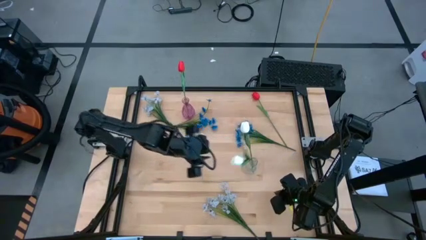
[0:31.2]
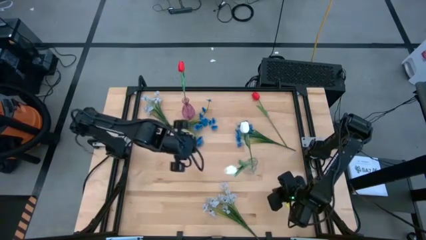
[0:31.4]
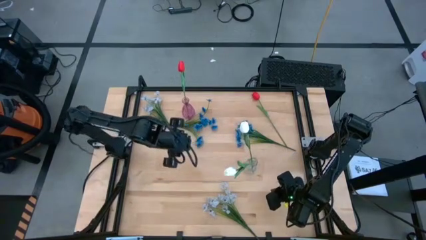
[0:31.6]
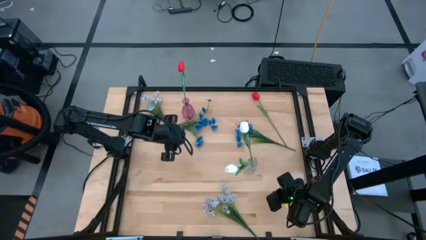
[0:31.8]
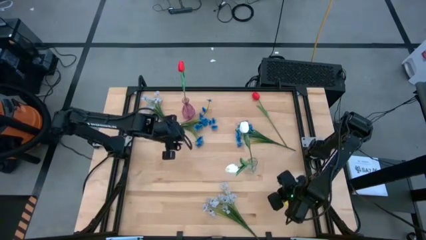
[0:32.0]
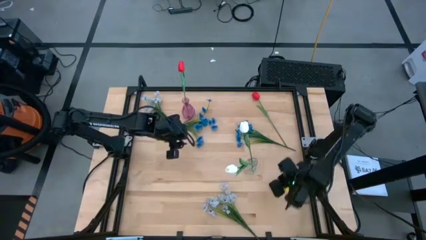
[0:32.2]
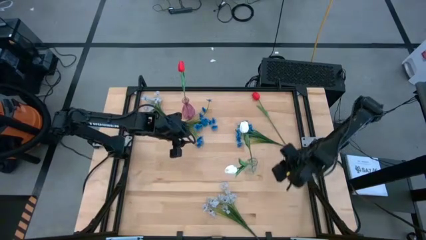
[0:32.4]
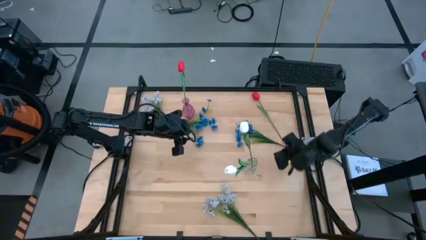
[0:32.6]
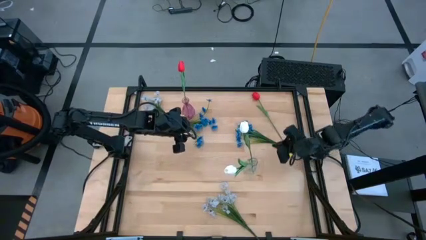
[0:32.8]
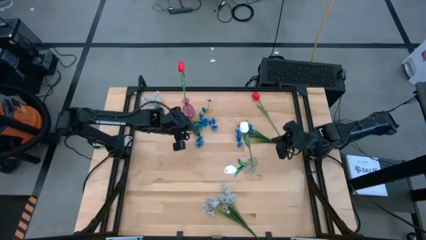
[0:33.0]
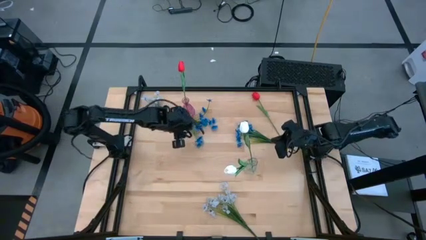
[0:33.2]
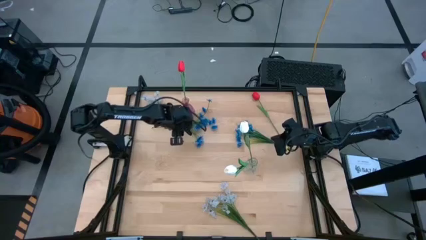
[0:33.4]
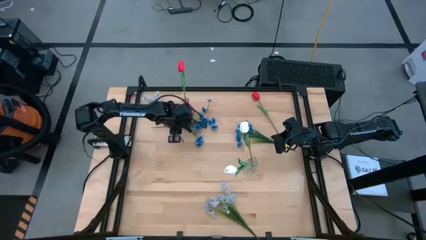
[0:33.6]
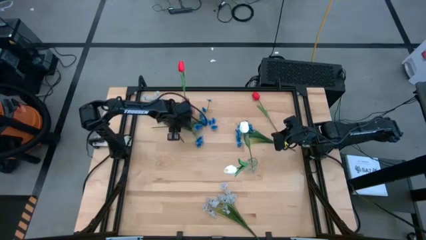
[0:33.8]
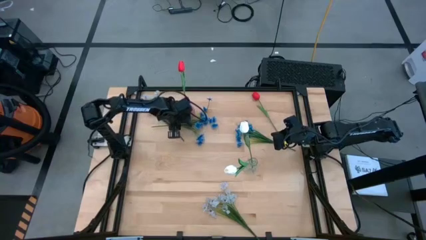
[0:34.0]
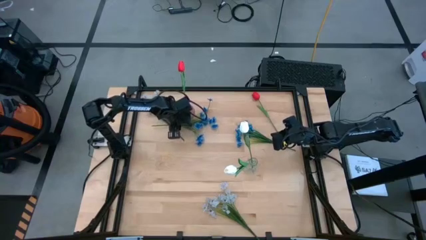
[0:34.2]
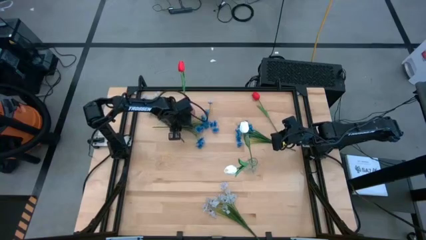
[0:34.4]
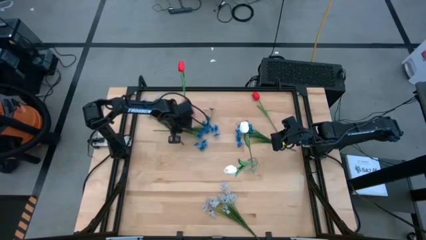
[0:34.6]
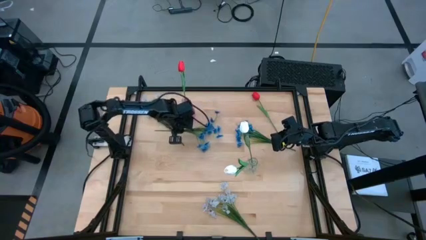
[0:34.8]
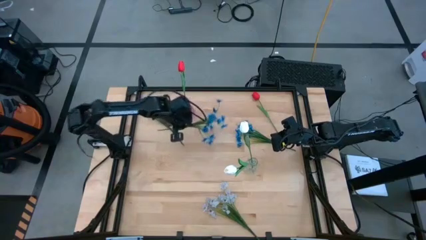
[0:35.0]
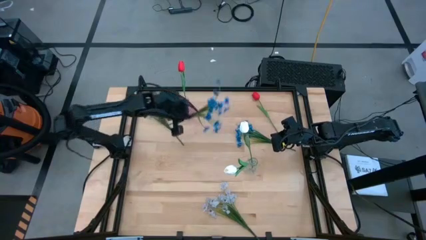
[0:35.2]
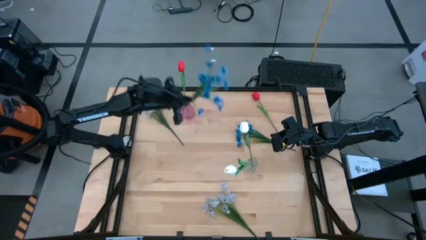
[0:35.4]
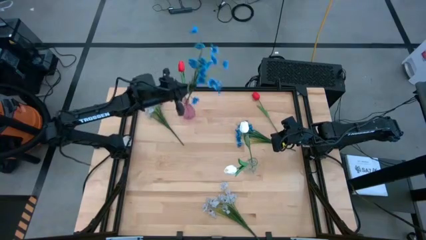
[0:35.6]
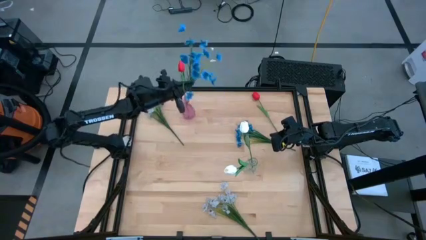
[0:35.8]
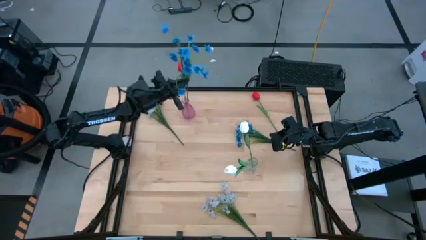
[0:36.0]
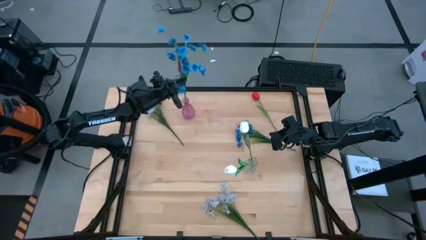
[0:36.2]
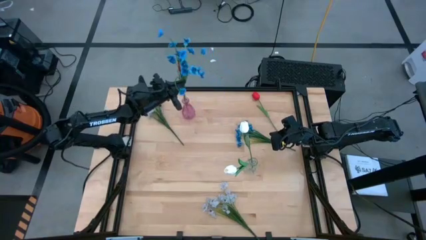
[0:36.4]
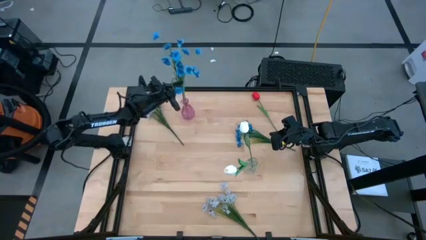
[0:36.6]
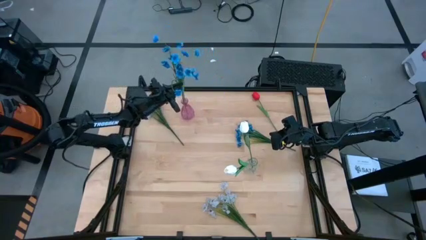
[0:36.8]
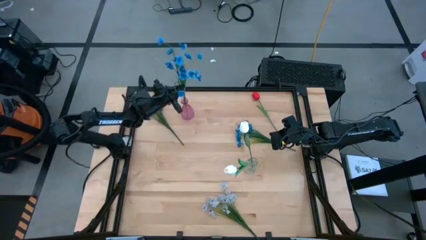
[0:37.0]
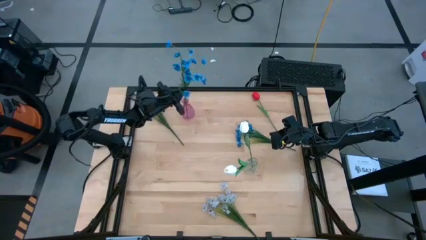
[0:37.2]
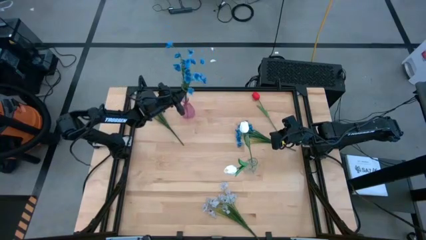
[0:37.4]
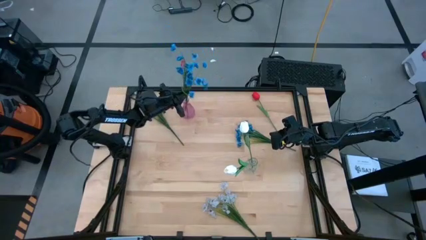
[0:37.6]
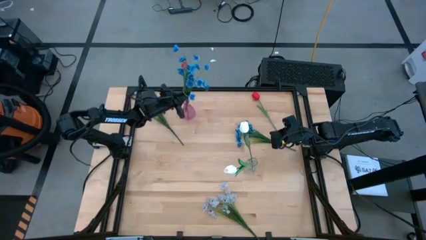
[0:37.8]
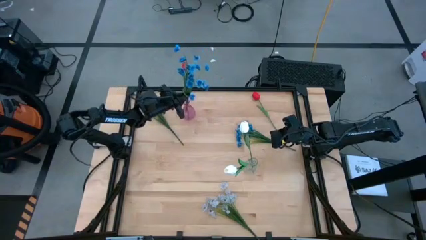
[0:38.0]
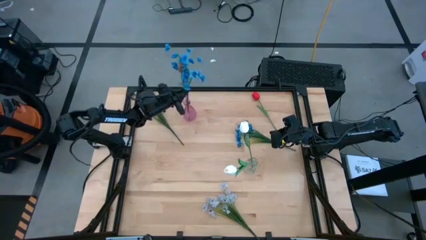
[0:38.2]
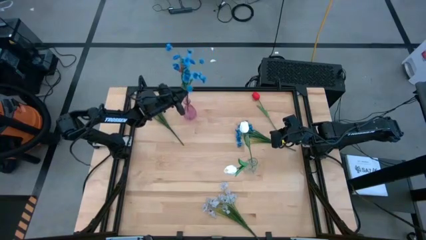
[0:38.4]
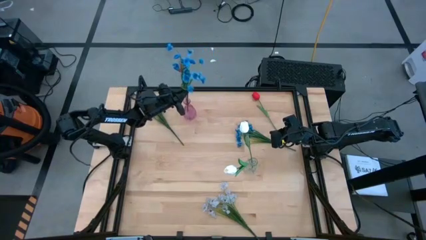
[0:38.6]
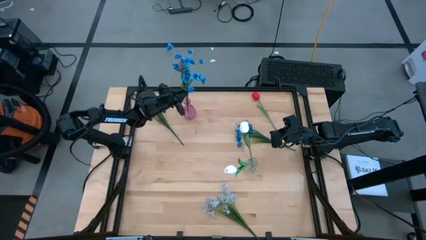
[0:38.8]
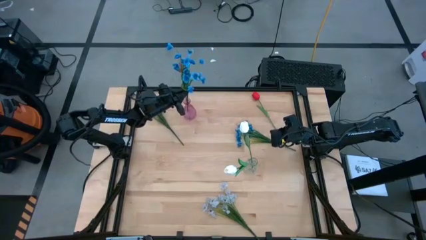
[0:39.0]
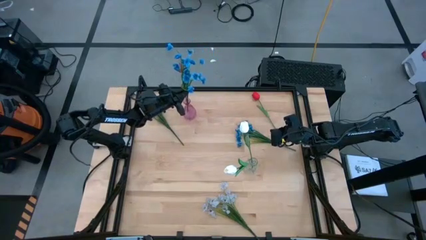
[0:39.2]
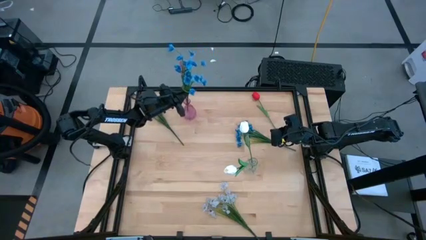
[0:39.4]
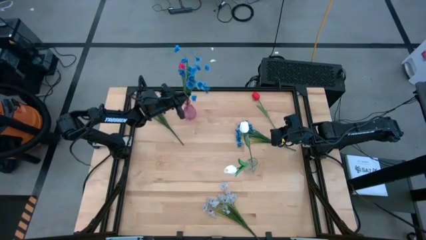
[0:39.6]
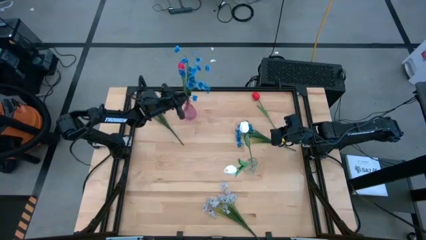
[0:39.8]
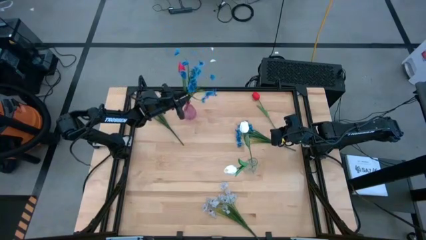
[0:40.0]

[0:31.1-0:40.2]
Task: Sort flowers into vase by color
Put the left blue flowers into the pink vase

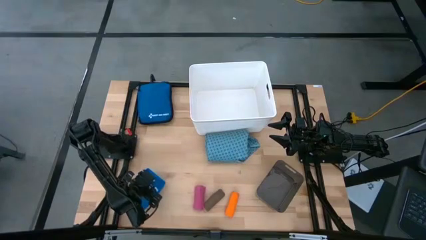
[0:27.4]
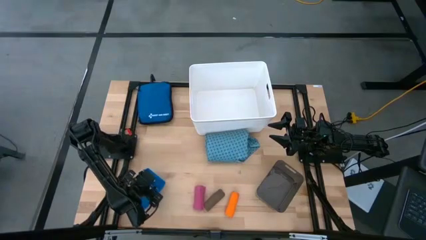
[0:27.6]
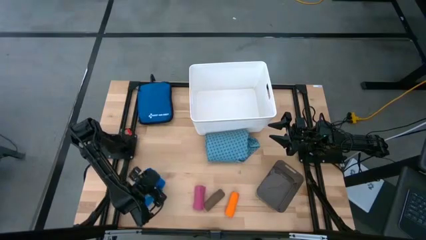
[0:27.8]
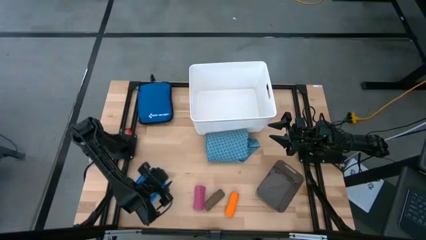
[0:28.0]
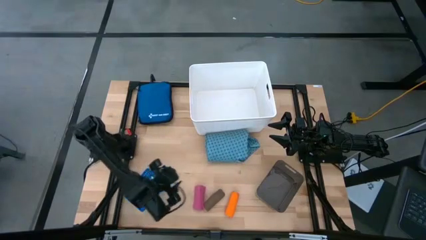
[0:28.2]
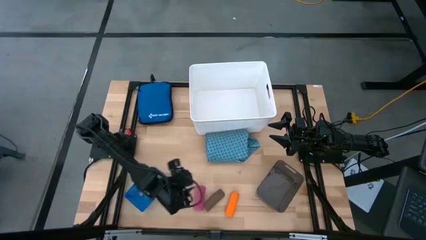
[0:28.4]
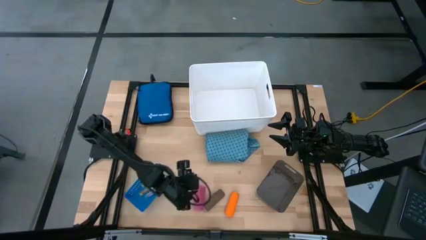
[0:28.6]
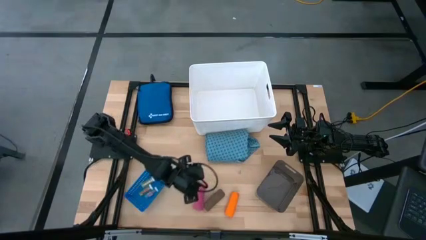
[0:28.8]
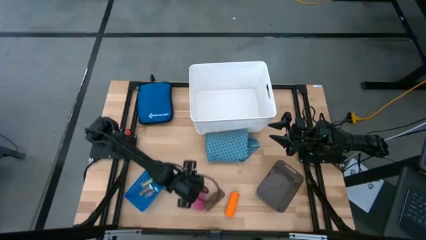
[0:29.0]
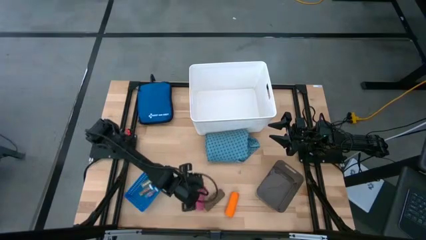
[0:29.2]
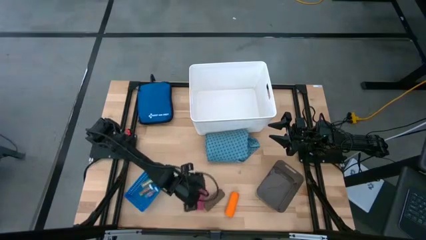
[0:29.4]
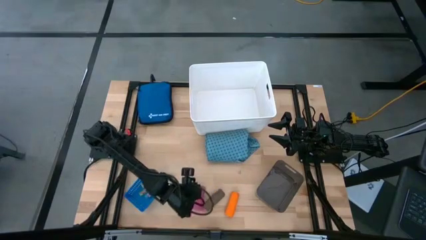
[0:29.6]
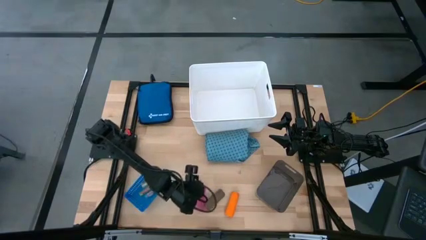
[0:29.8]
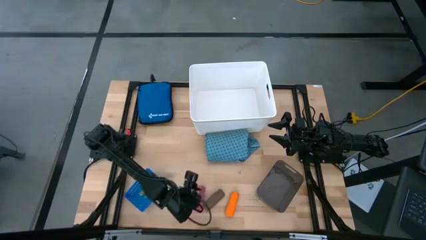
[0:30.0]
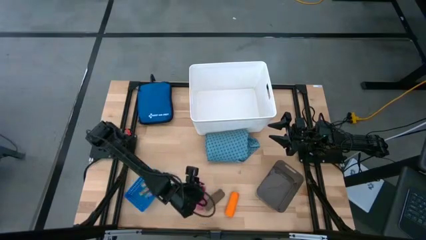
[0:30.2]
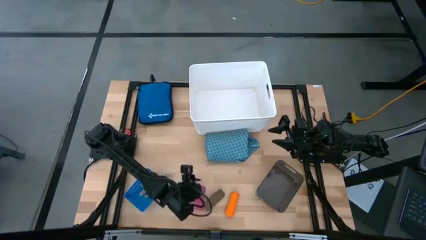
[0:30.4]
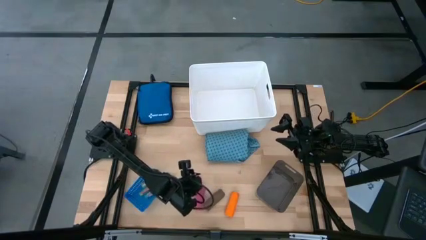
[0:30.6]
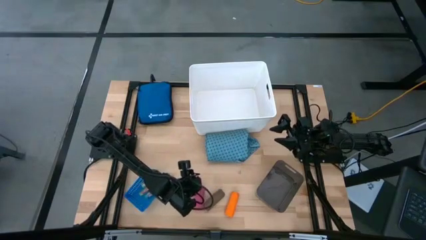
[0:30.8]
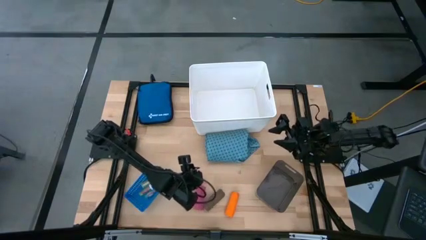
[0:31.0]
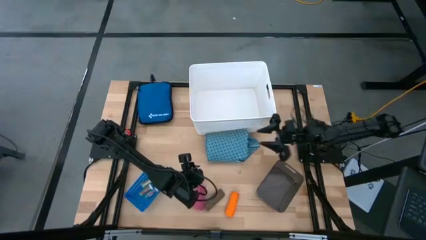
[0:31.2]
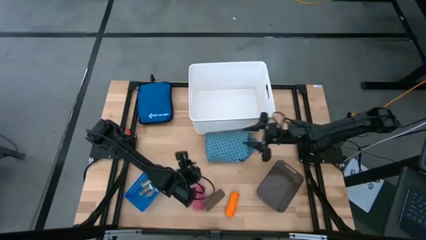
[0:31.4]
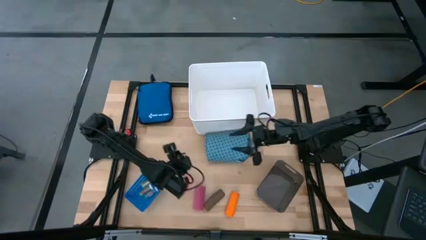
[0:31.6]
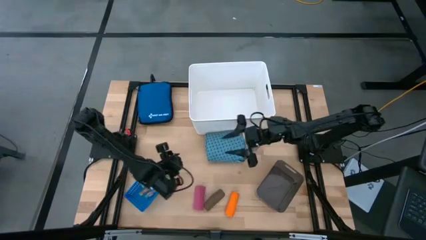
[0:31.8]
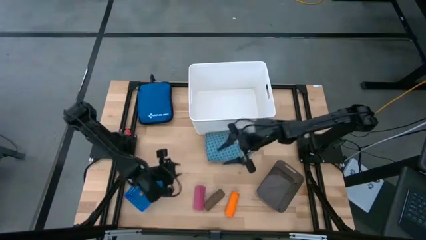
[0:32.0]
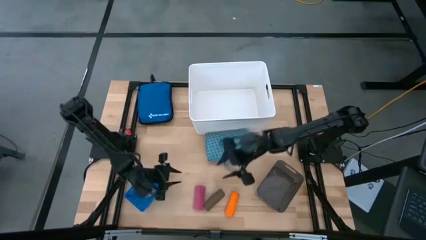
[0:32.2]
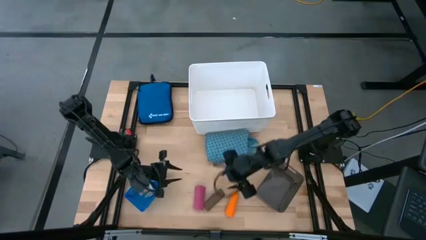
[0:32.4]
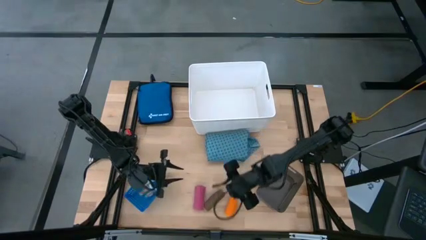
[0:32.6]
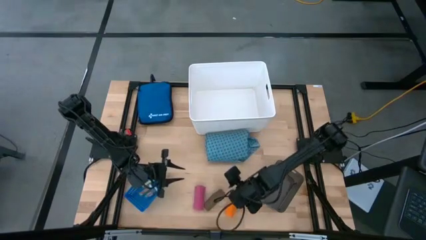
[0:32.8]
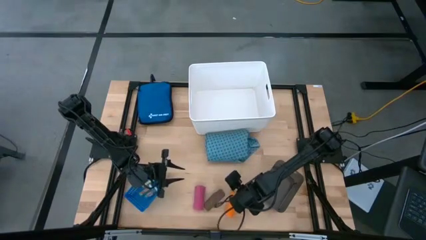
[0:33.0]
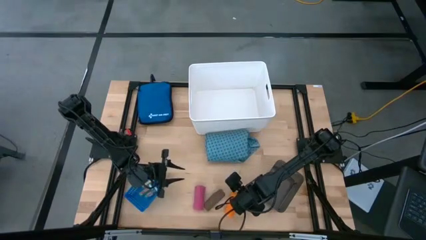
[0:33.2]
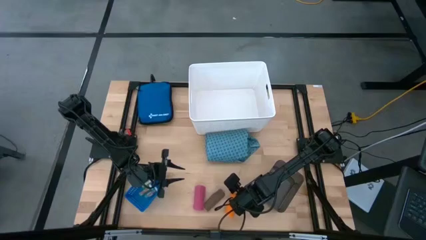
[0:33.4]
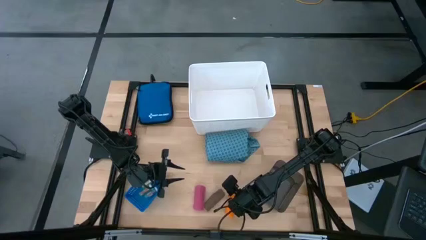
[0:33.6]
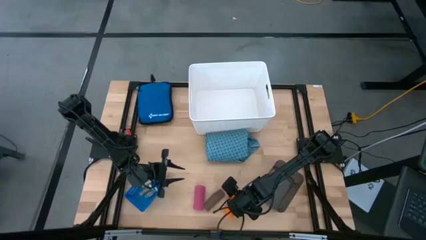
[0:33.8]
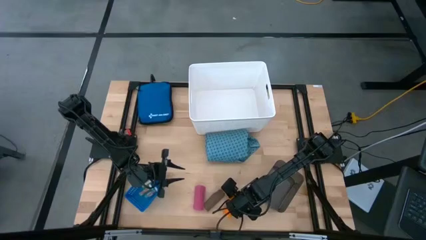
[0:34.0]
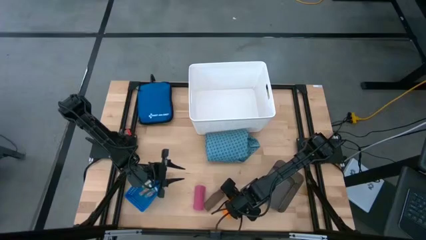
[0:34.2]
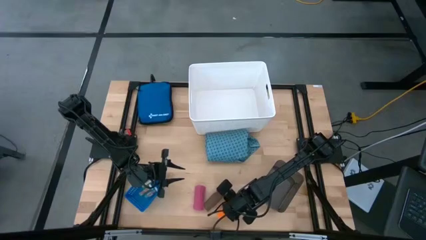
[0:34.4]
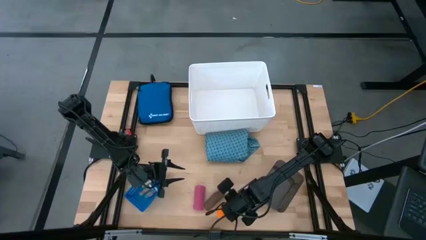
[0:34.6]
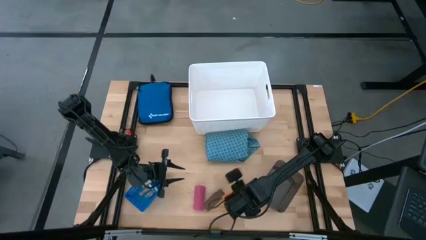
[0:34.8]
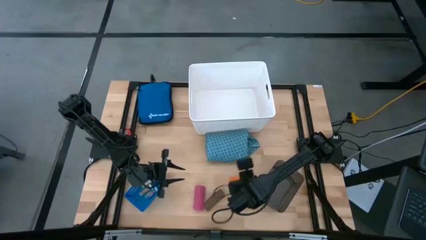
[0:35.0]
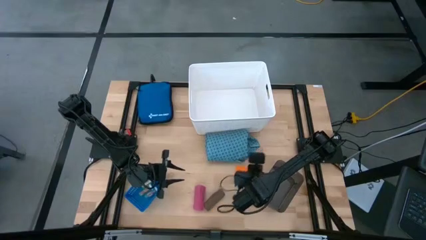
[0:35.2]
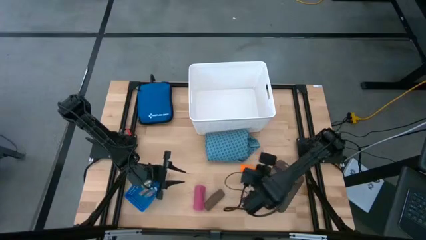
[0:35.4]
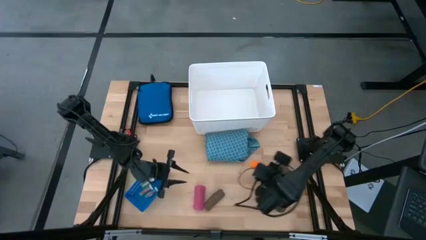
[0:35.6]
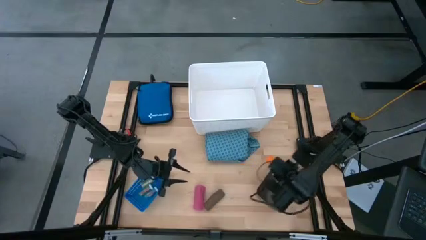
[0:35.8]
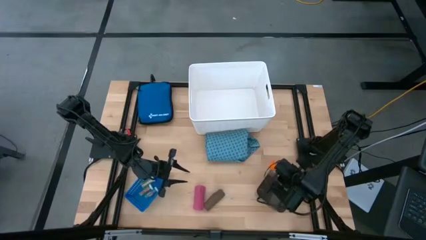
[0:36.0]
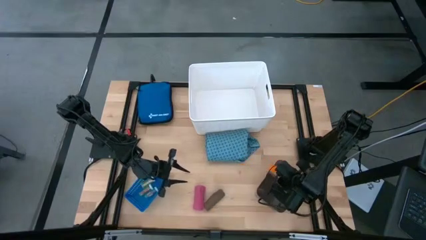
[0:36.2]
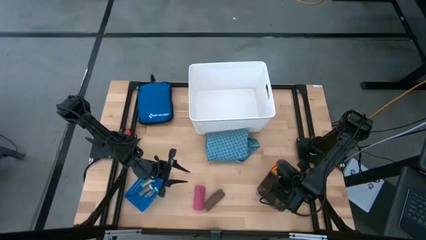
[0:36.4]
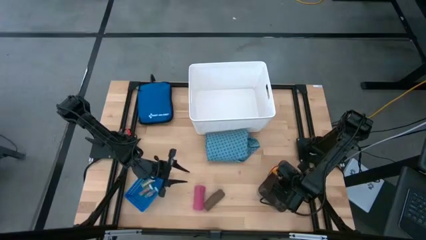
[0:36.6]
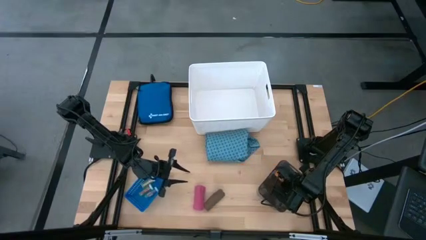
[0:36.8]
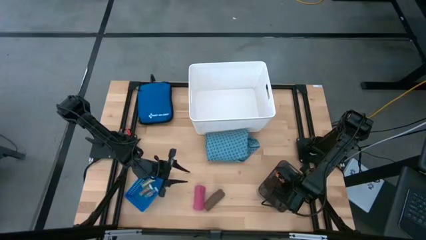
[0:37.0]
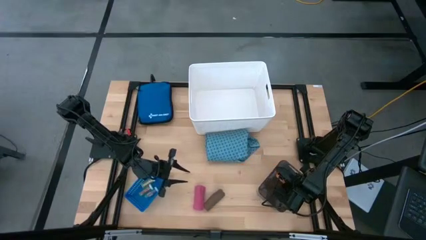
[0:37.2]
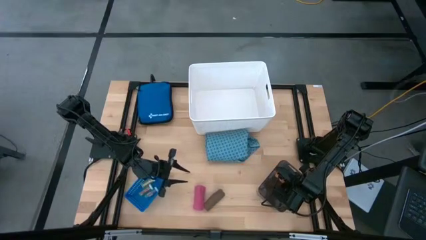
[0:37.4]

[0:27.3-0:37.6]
Task: Pick & Place Medicine items
Put the orange bandage into the black bin
